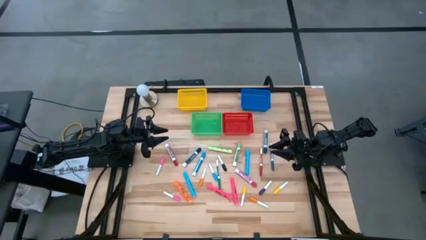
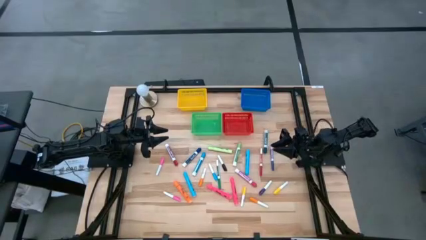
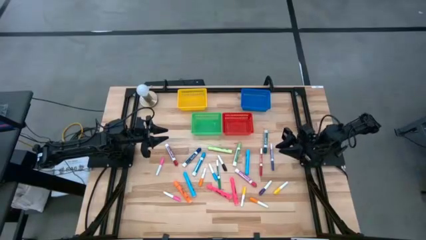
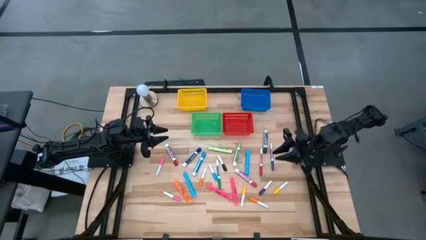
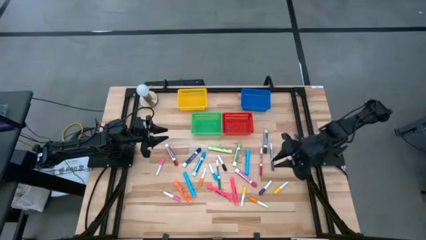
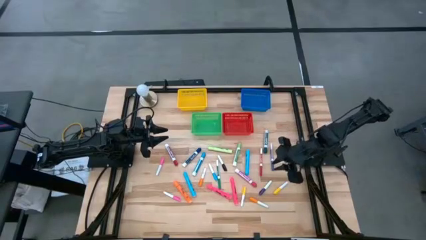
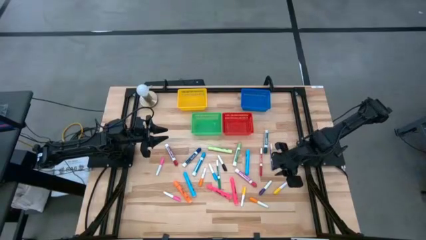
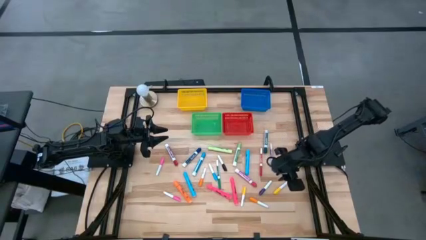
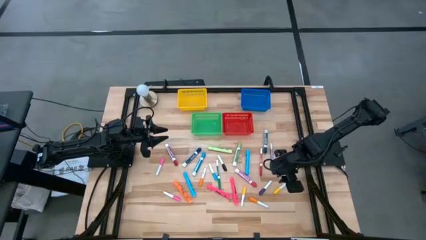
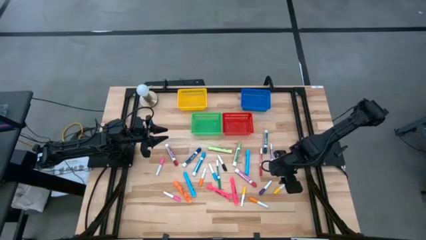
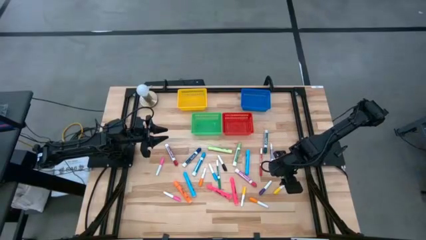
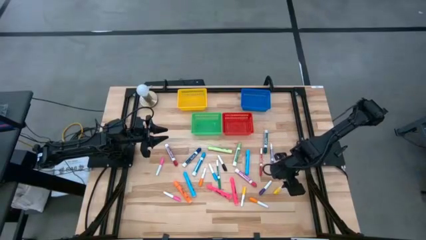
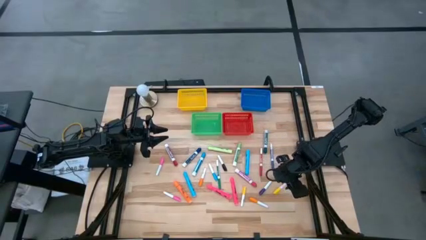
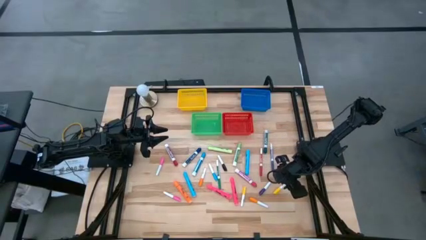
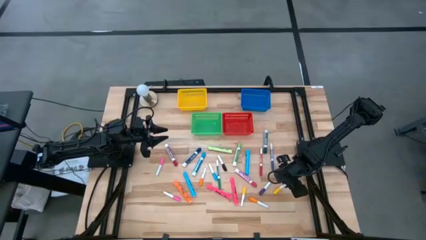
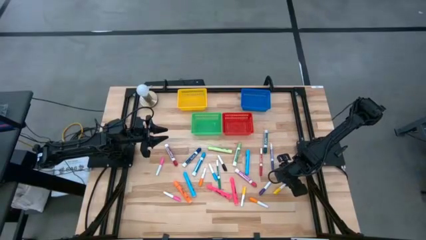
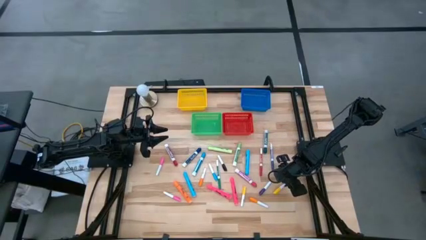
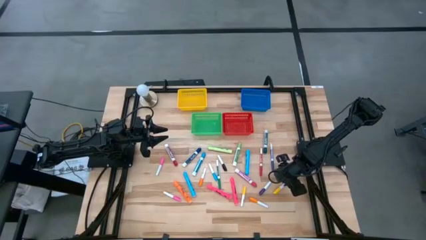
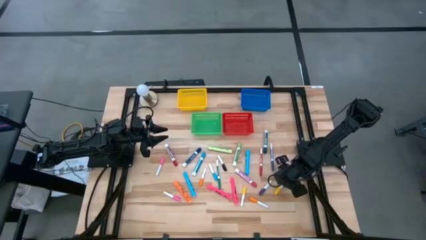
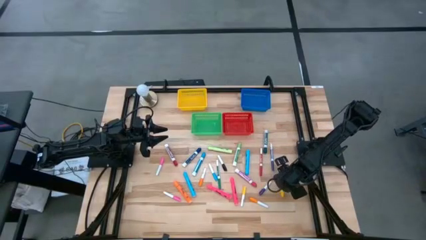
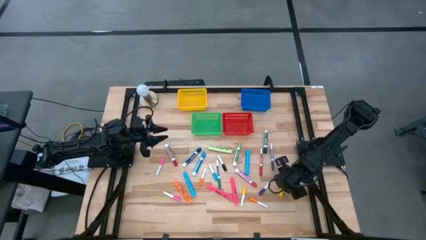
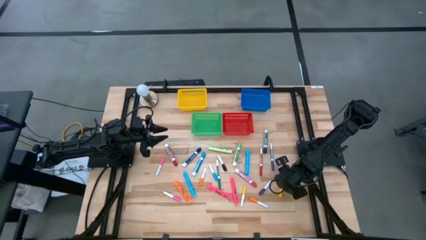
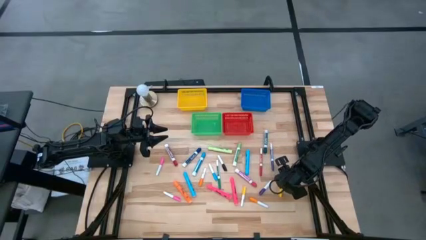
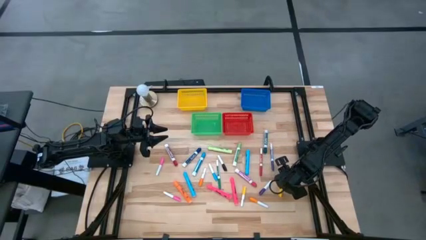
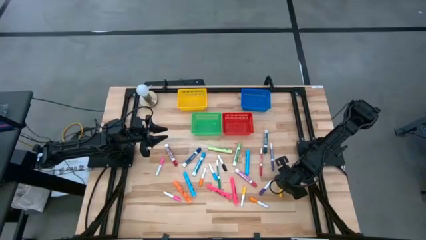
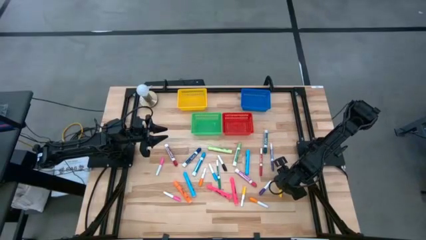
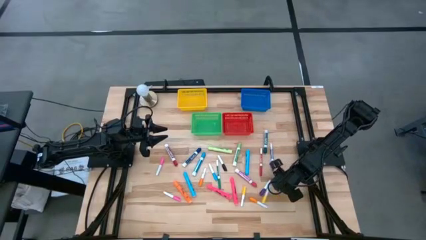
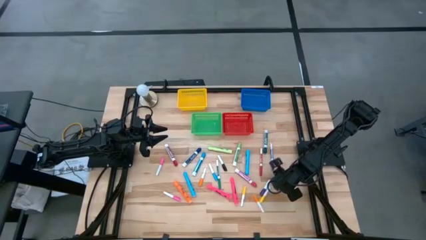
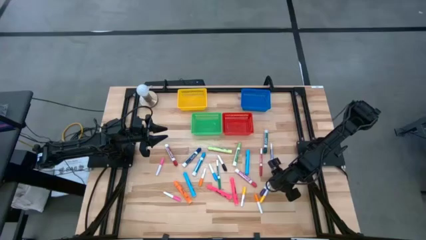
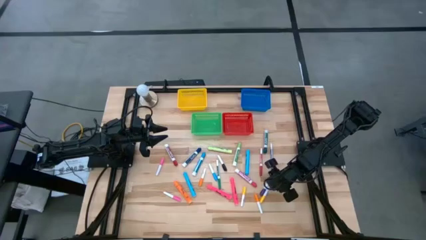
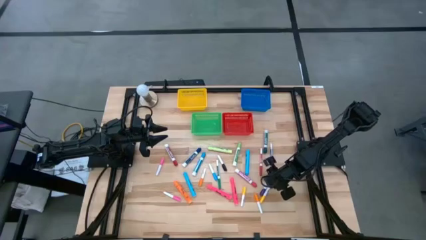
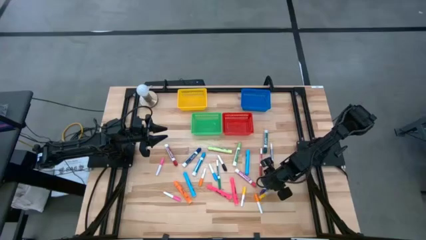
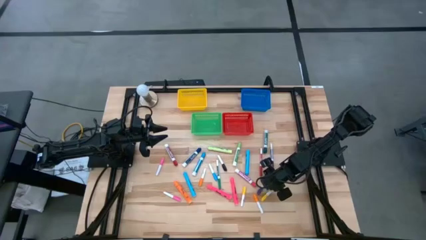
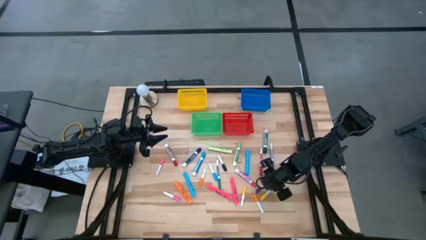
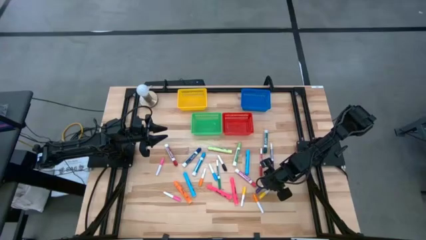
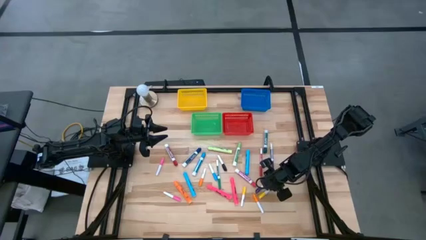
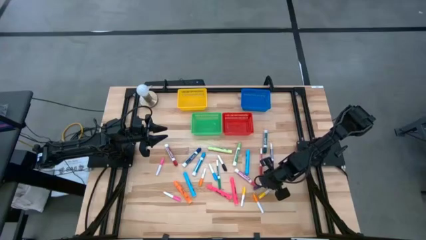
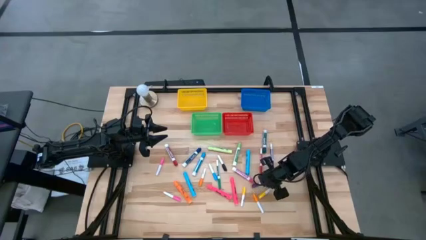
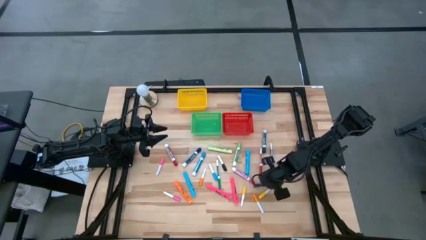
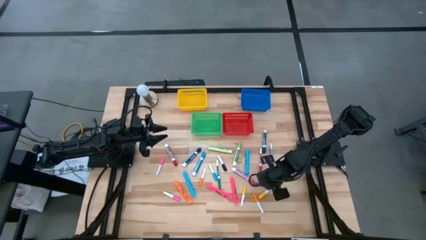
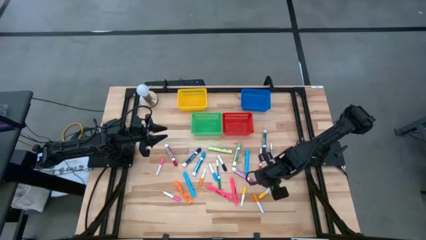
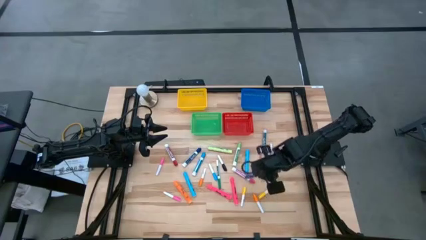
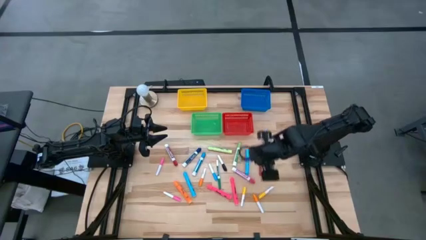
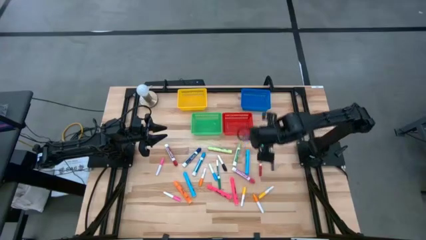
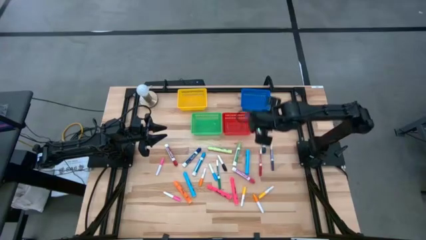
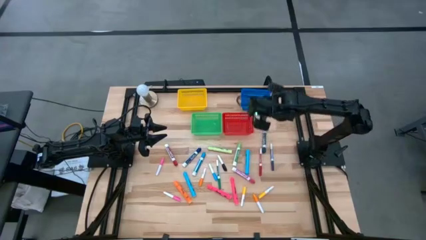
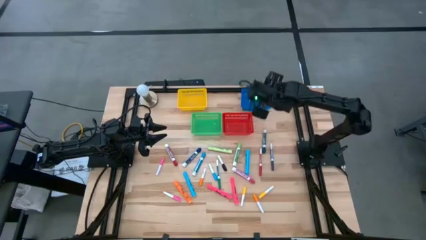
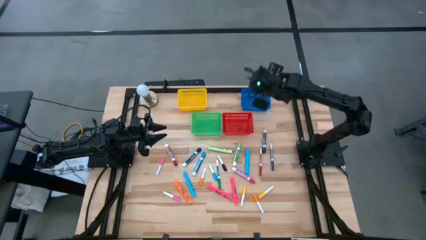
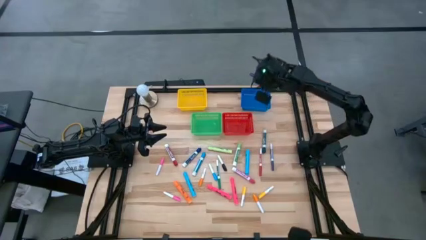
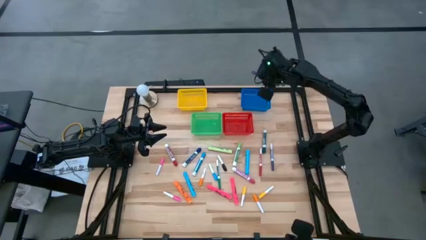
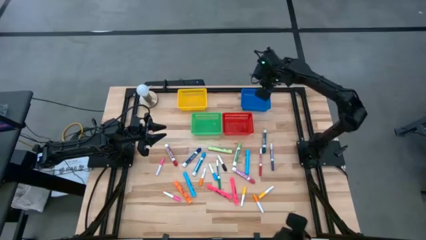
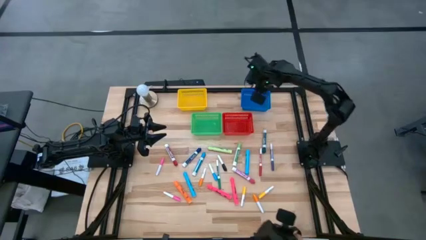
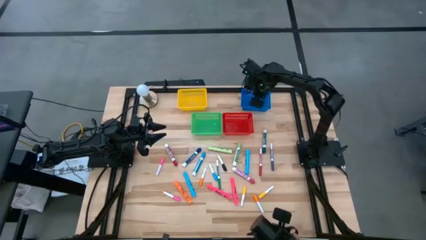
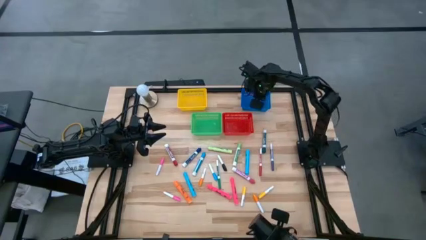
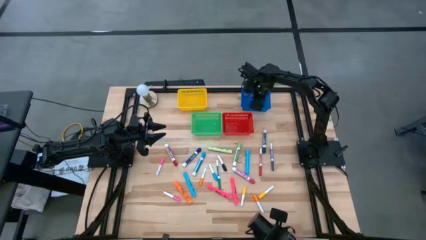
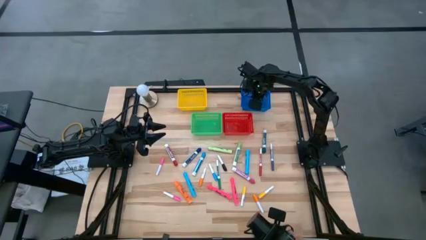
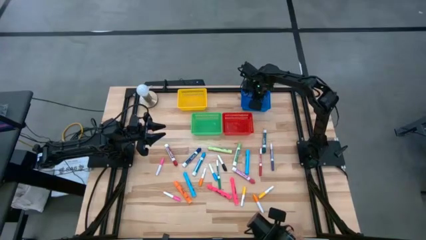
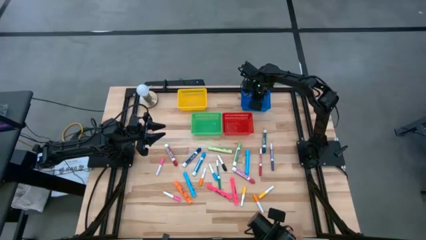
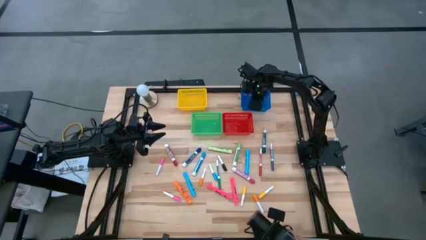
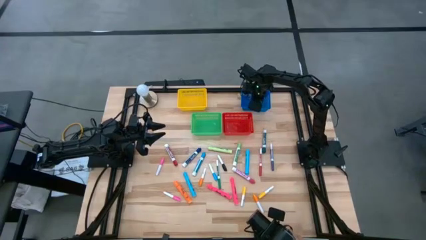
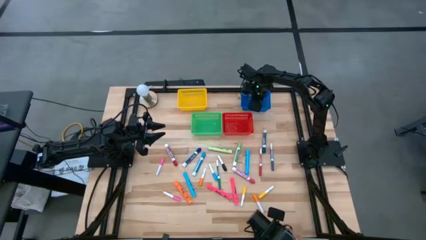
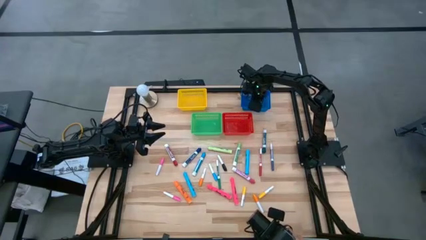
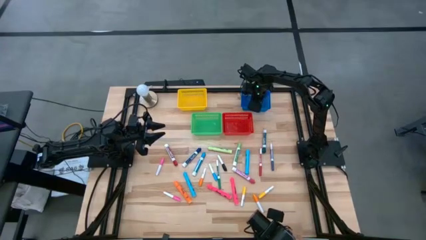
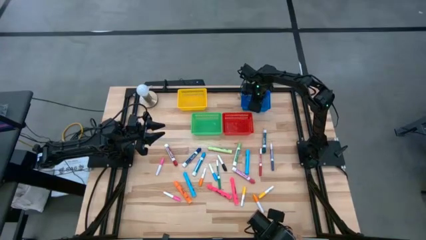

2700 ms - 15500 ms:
Task: Pick & Place Markers
Put the purple highlighter into the blue bin
